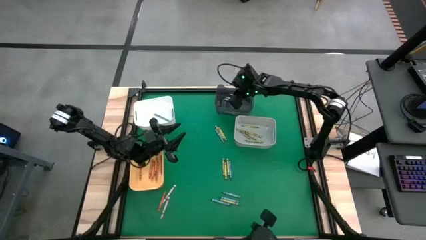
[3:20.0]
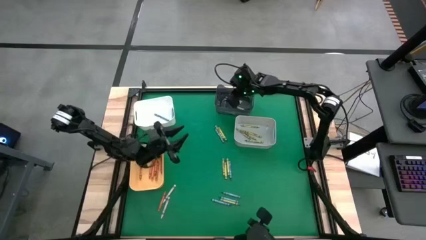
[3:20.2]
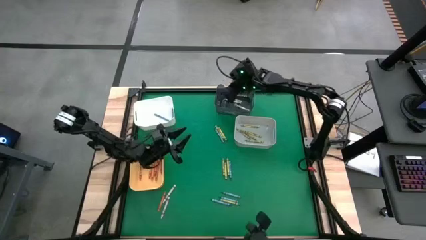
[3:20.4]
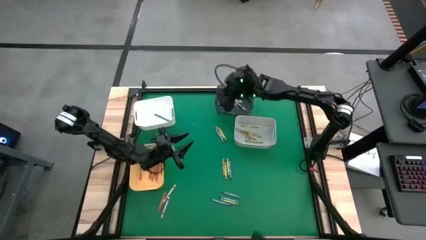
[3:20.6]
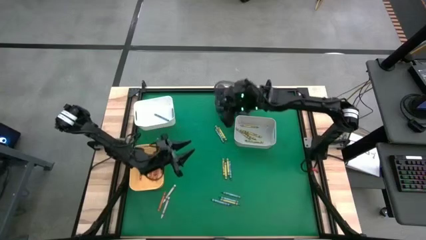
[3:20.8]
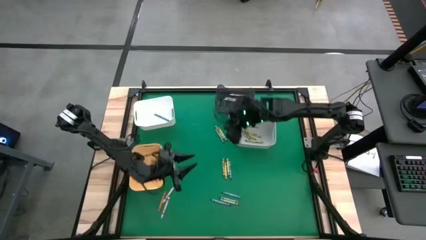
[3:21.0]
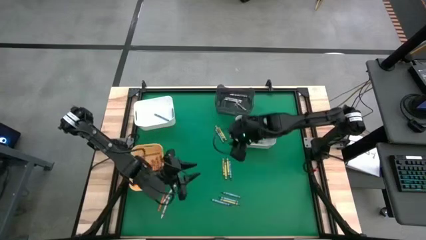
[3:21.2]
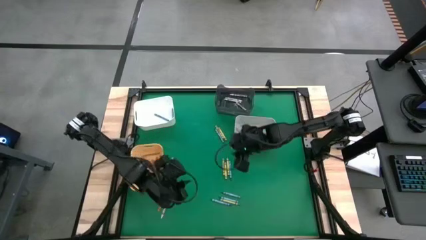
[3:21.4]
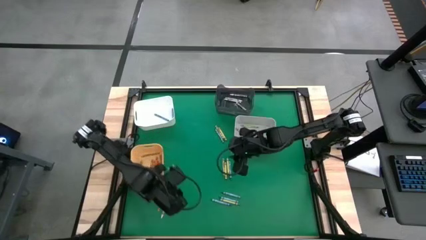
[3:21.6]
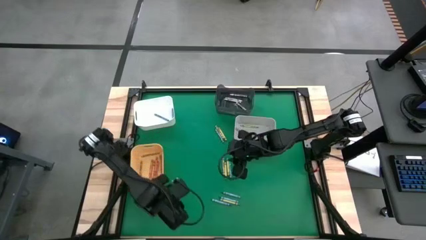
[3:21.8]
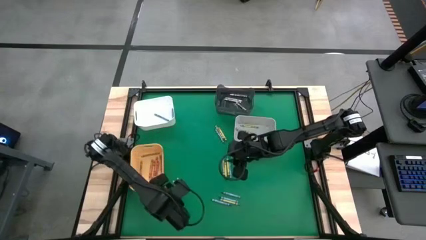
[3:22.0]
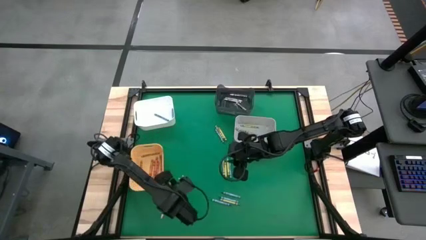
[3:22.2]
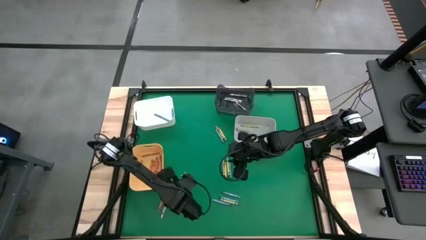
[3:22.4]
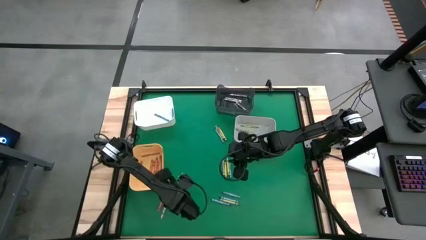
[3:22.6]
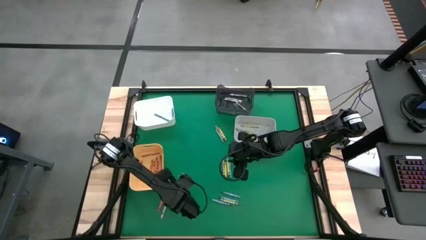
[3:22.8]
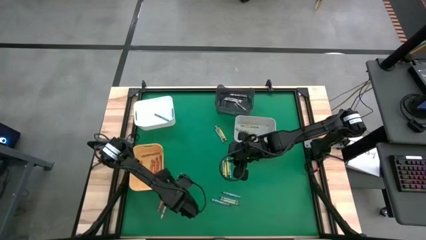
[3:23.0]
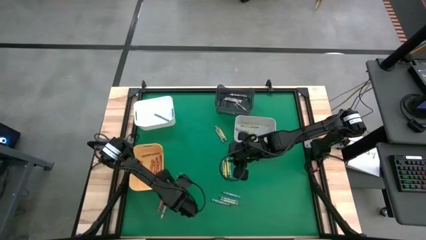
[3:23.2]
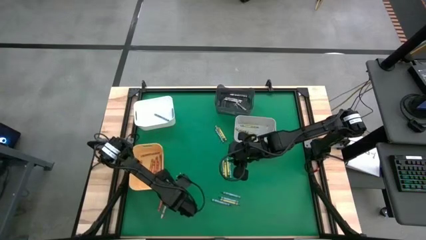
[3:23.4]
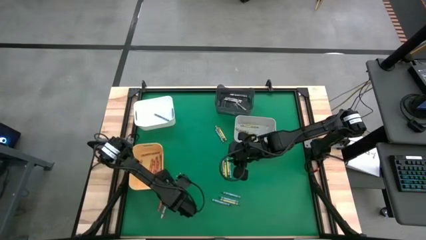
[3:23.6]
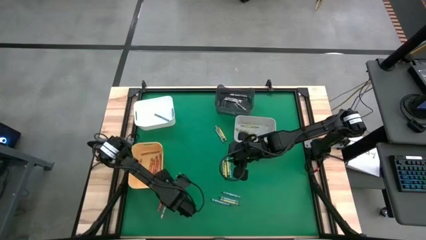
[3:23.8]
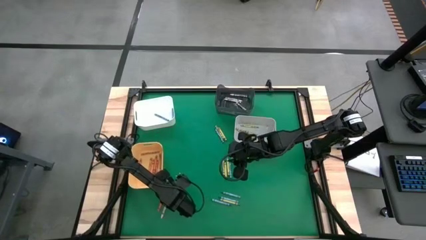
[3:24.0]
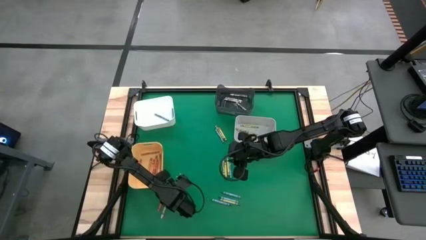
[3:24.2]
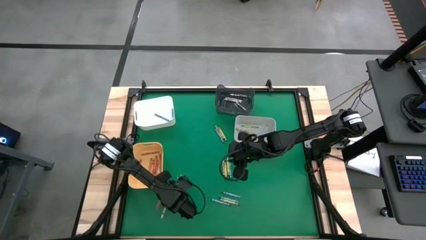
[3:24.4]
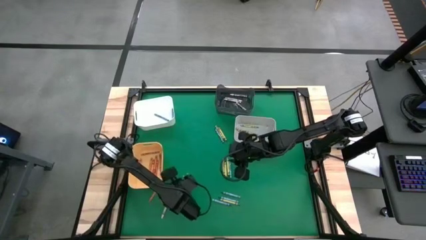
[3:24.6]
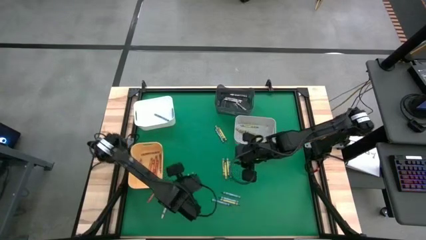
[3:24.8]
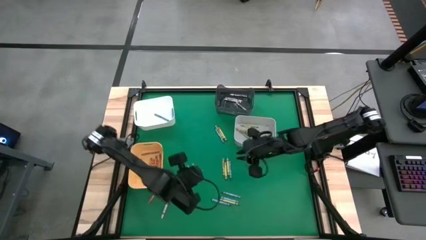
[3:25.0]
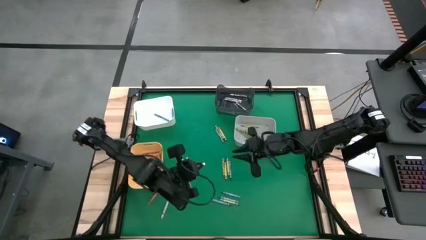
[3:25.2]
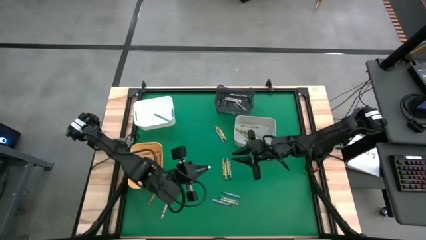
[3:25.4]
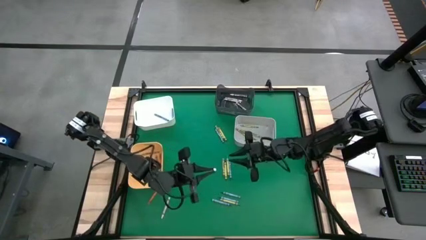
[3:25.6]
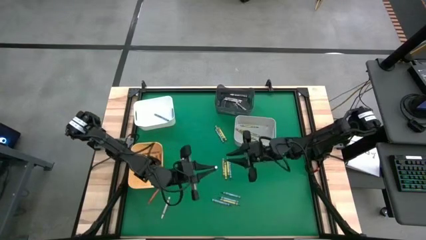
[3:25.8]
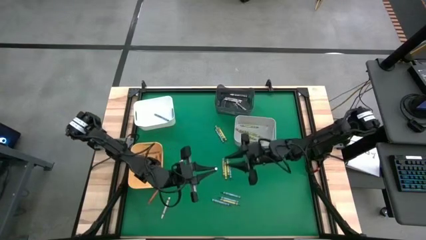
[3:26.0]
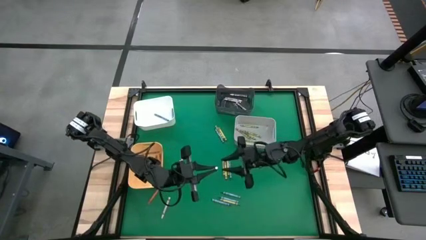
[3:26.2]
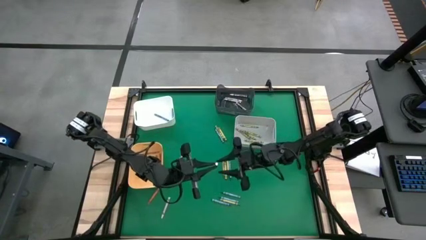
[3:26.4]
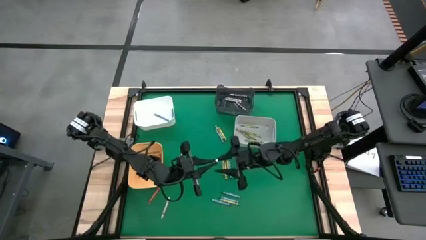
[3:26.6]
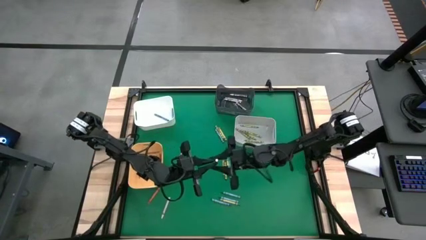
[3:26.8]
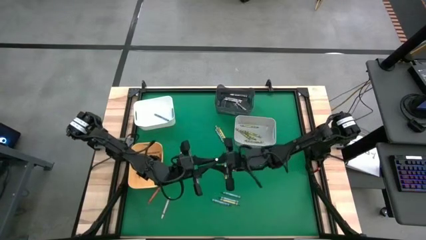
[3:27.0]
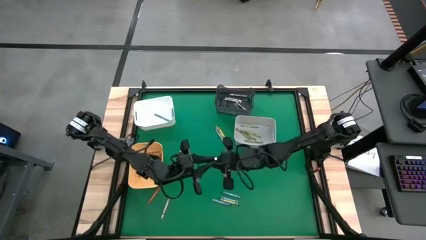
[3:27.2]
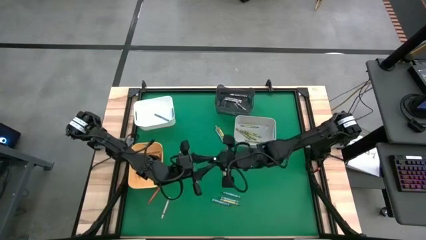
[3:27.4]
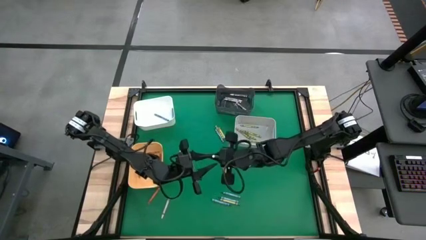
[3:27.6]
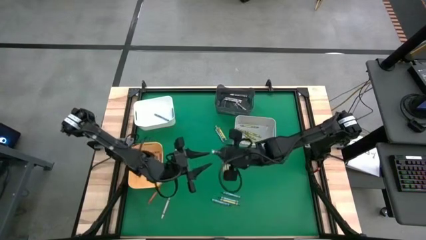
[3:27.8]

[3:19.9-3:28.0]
Task: Sort crayons
Put the white crayon into the black bin

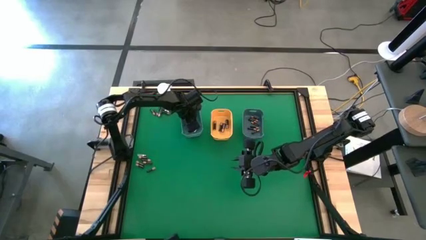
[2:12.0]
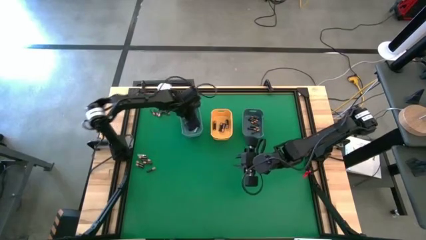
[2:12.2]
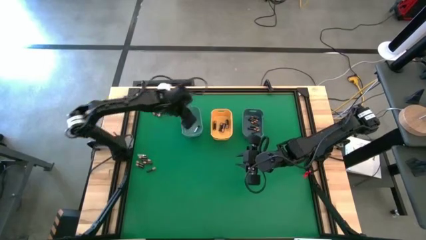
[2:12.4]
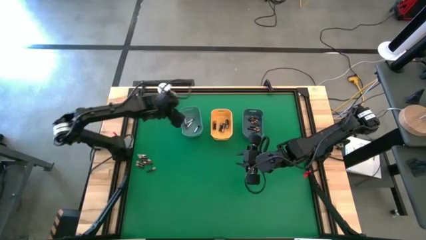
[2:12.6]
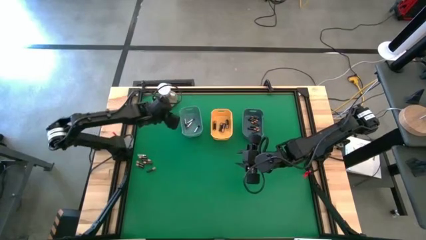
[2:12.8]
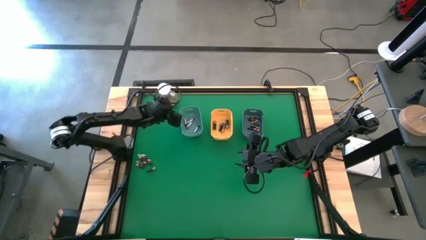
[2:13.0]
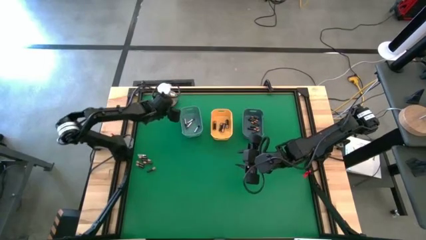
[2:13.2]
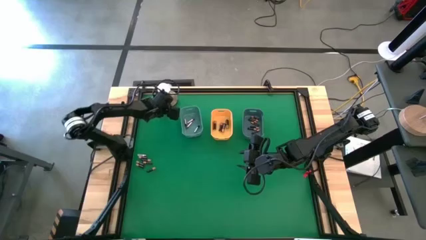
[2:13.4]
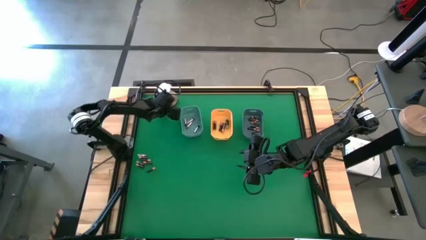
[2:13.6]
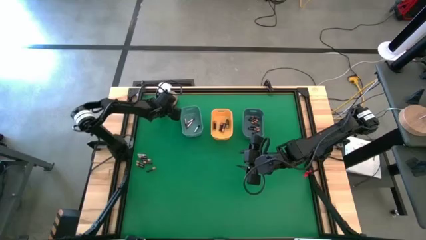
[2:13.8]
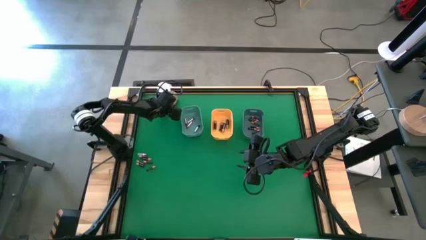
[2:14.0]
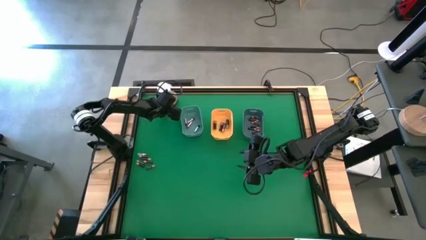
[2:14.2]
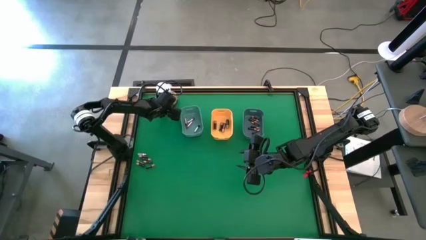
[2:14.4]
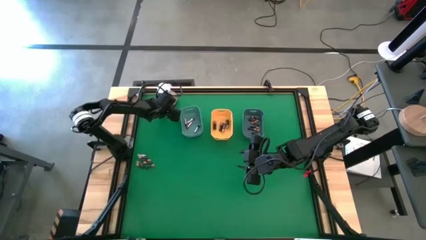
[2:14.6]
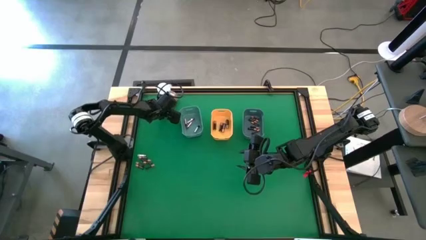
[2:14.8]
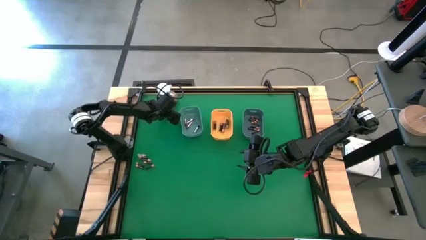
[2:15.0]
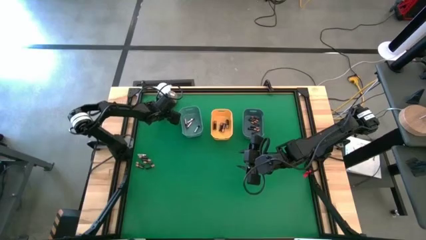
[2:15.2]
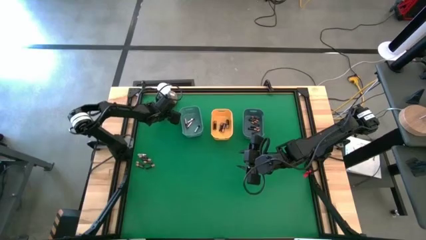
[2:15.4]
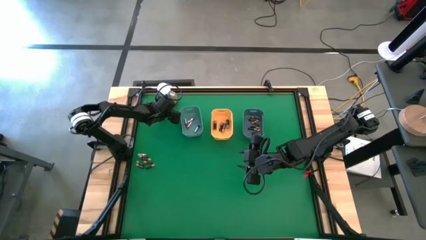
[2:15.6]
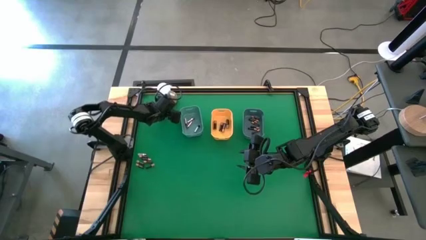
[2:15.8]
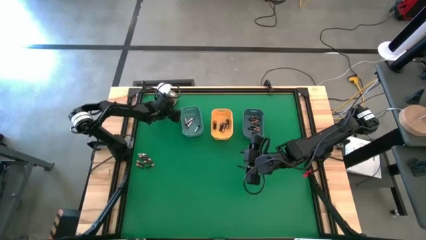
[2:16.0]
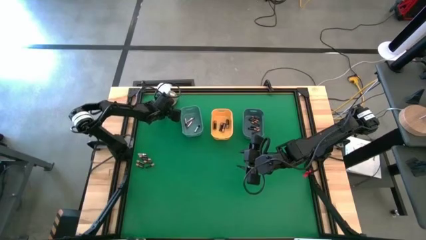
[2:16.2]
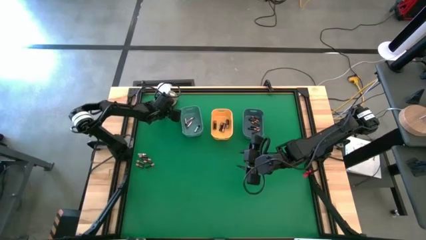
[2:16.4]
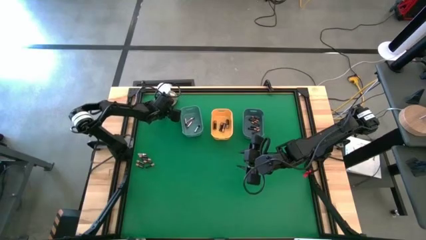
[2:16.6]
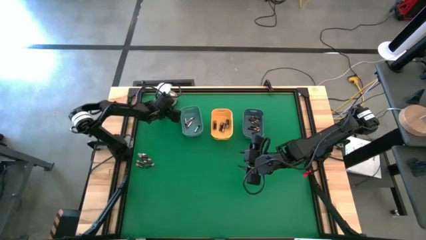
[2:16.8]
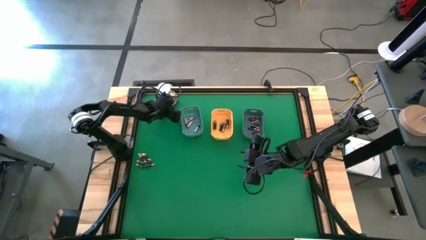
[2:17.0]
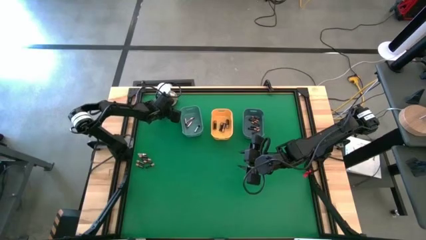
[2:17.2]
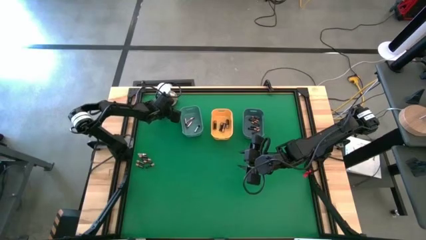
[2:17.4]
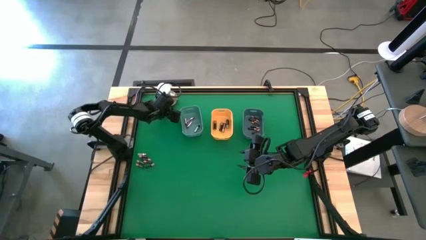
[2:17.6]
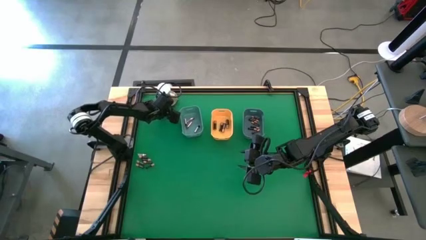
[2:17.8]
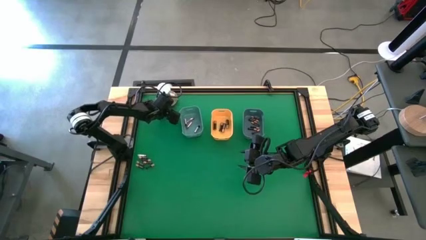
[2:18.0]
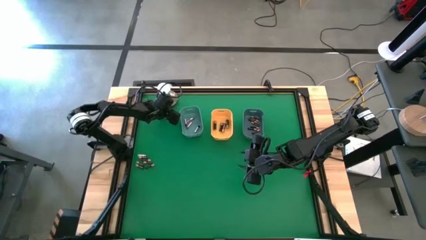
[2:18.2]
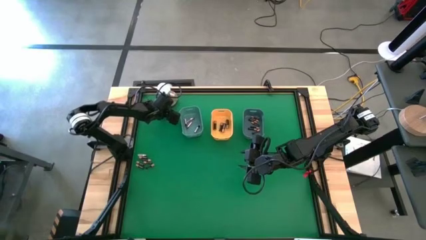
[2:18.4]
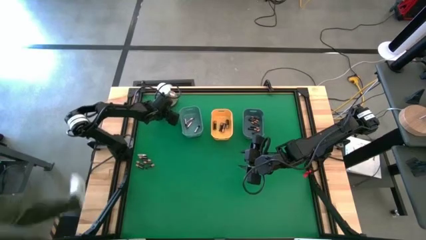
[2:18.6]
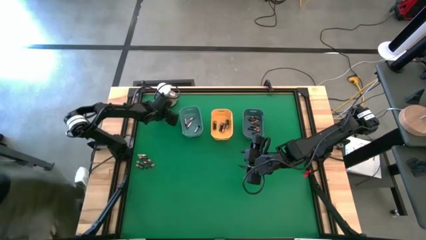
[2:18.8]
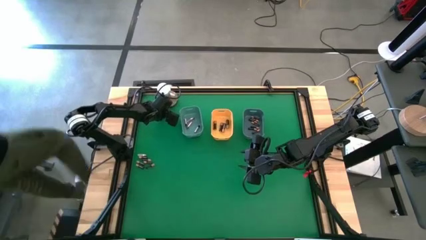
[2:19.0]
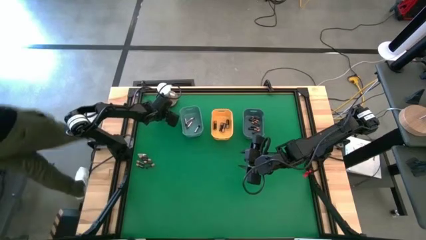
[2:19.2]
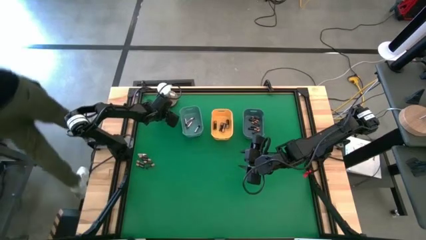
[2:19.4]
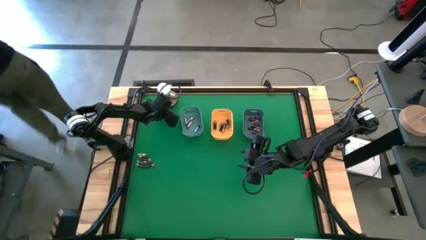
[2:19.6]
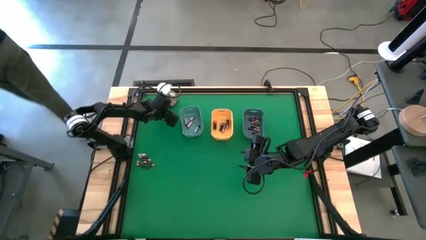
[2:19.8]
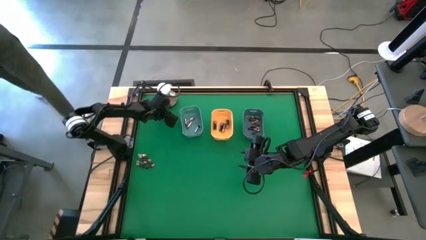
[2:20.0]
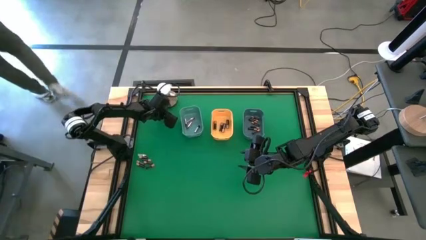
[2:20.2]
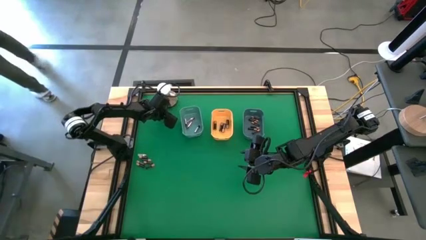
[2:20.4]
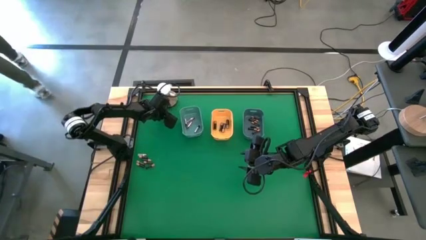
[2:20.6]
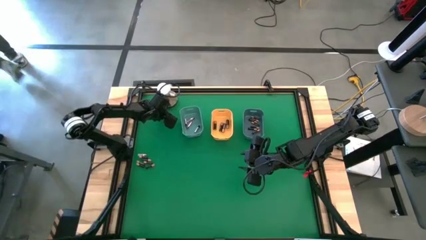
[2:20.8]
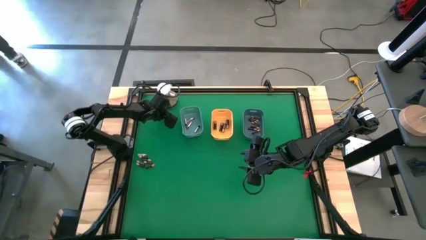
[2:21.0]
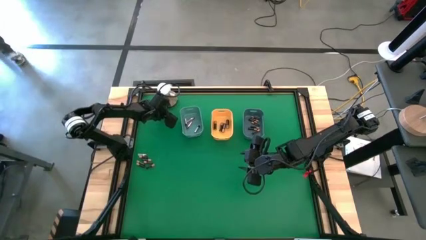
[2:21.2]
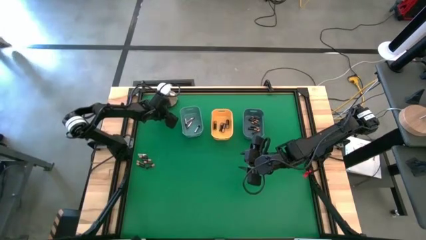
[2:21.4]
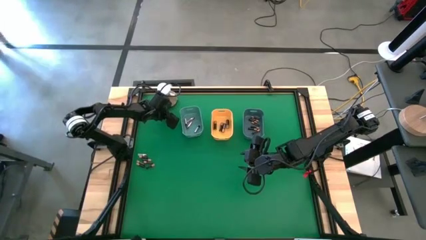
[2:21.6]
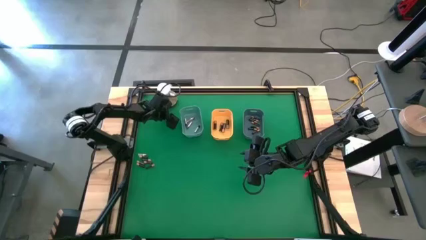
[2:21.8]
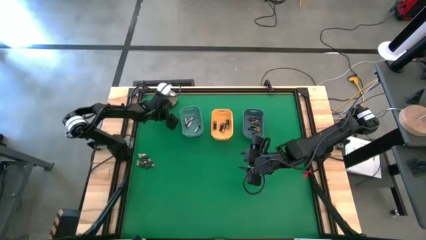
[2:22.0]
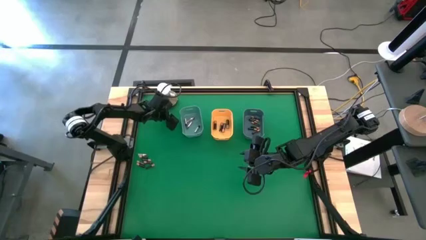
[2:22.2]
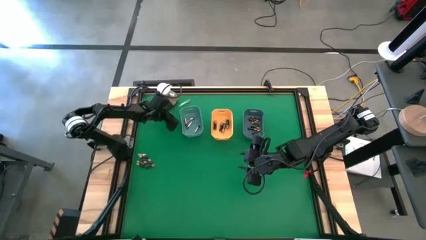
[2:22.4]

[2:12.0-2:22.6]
Task: Sort batteries
Put the silver battery into the green bin
